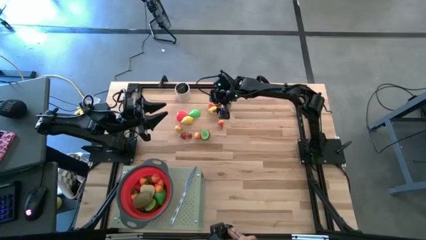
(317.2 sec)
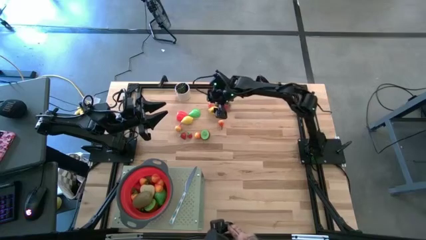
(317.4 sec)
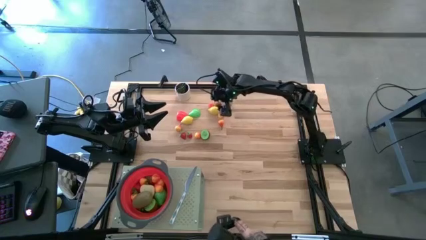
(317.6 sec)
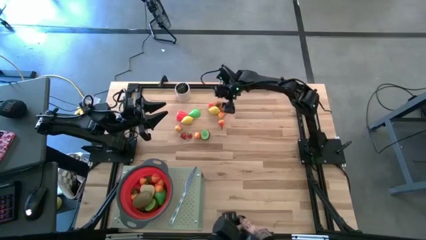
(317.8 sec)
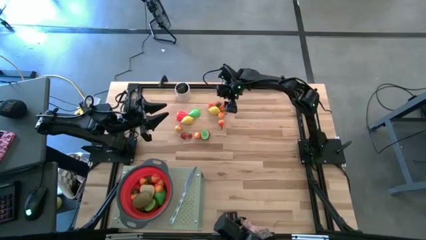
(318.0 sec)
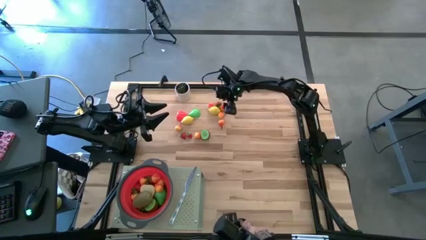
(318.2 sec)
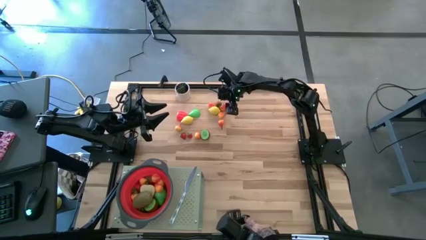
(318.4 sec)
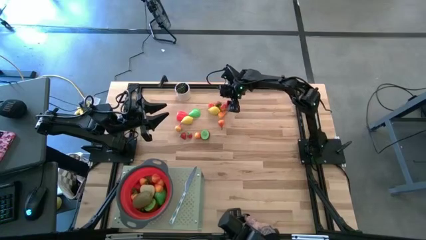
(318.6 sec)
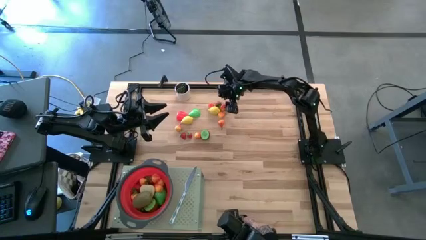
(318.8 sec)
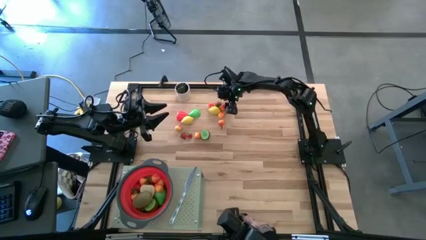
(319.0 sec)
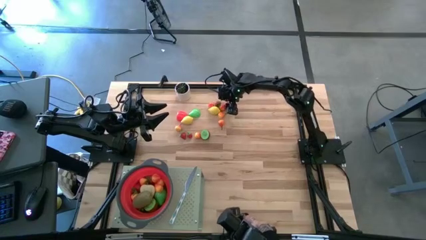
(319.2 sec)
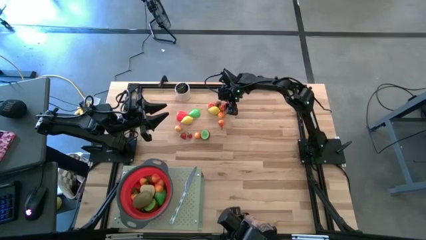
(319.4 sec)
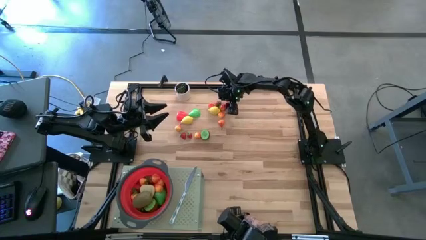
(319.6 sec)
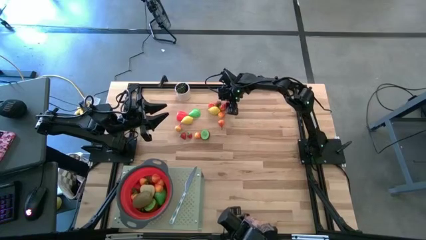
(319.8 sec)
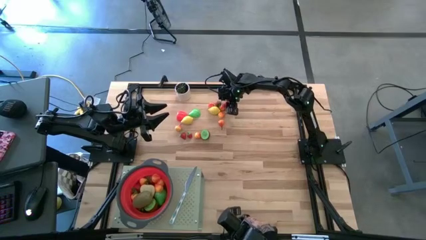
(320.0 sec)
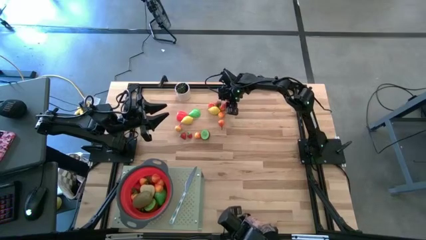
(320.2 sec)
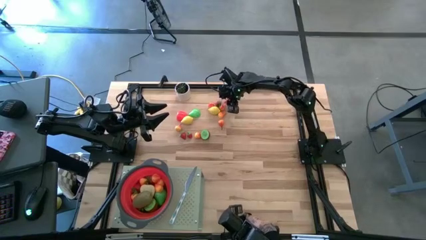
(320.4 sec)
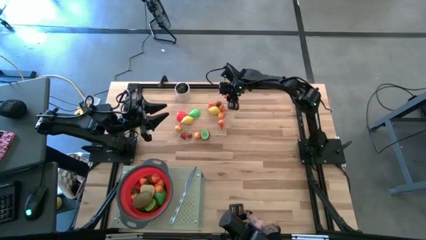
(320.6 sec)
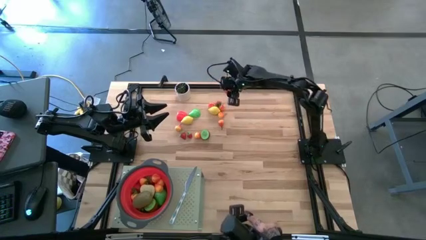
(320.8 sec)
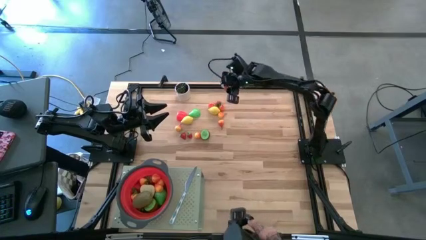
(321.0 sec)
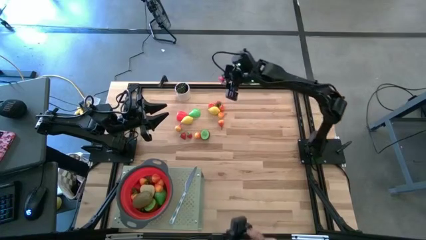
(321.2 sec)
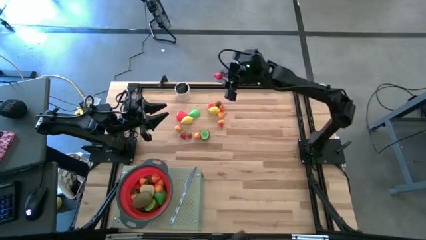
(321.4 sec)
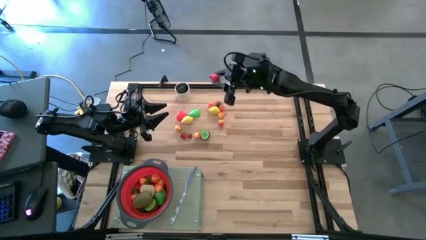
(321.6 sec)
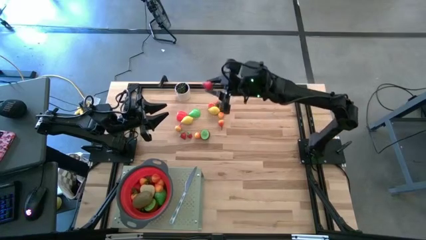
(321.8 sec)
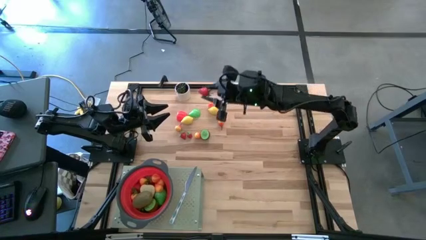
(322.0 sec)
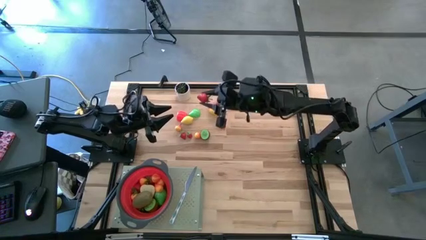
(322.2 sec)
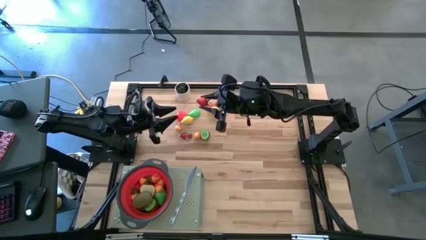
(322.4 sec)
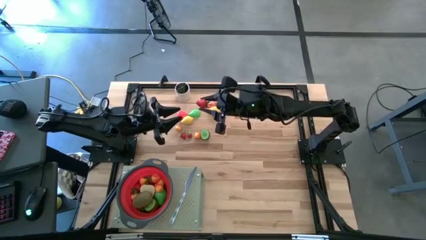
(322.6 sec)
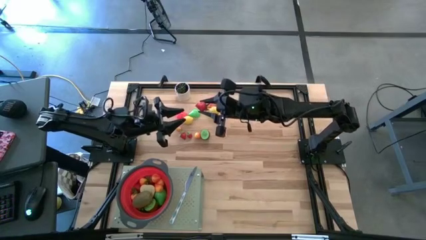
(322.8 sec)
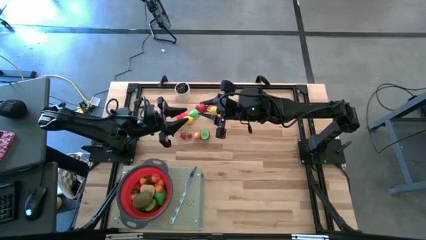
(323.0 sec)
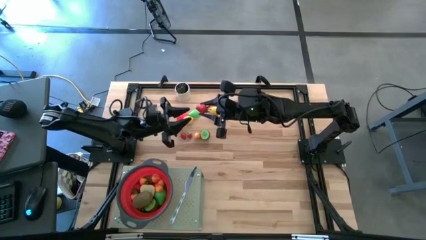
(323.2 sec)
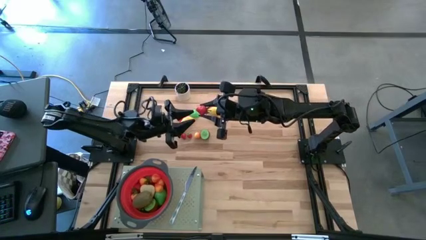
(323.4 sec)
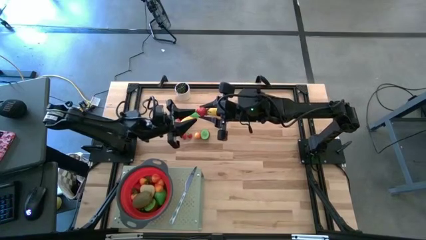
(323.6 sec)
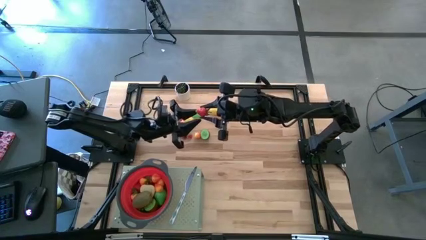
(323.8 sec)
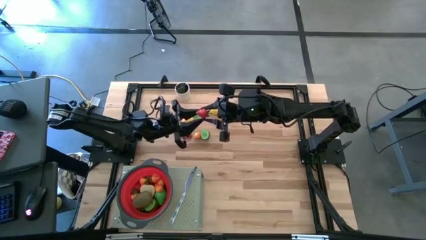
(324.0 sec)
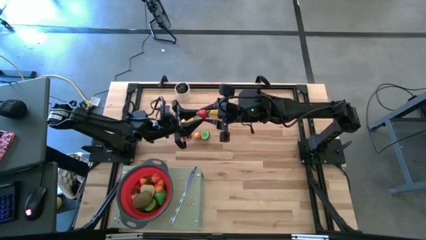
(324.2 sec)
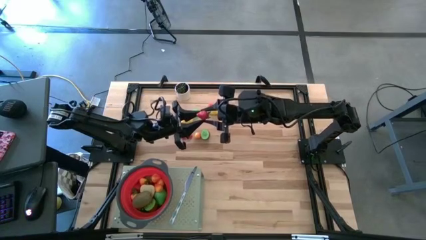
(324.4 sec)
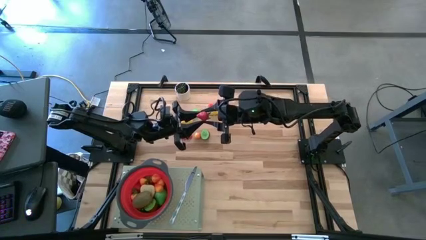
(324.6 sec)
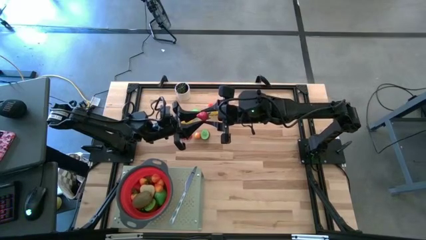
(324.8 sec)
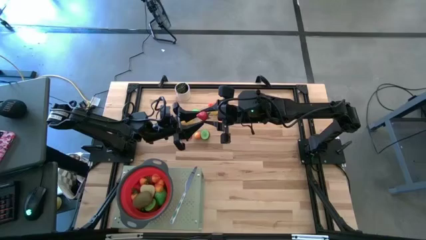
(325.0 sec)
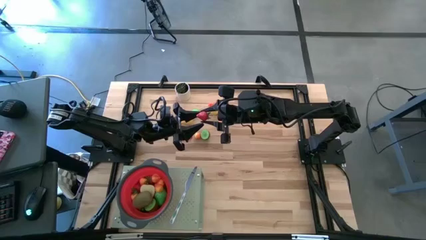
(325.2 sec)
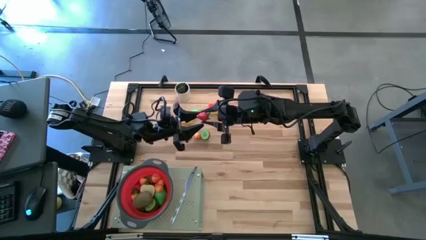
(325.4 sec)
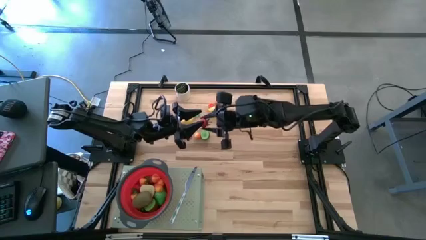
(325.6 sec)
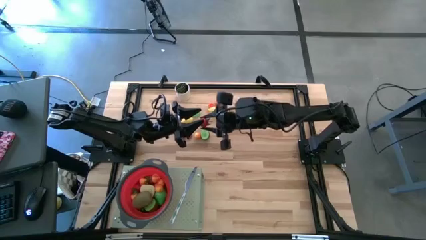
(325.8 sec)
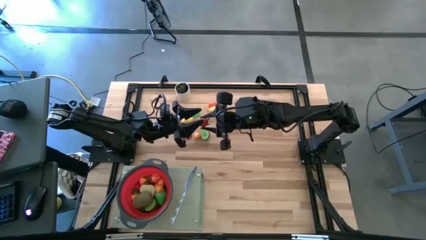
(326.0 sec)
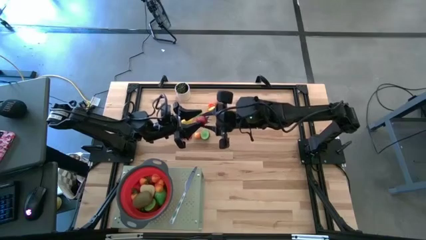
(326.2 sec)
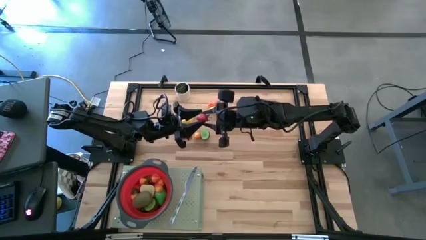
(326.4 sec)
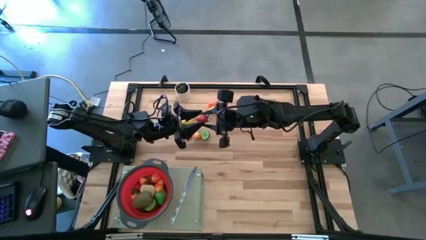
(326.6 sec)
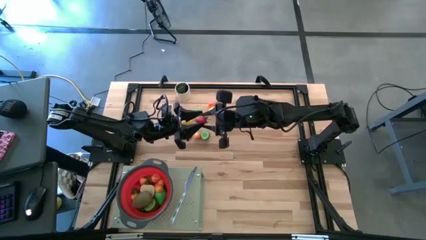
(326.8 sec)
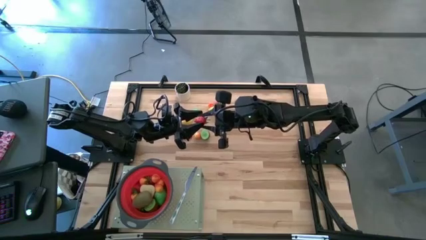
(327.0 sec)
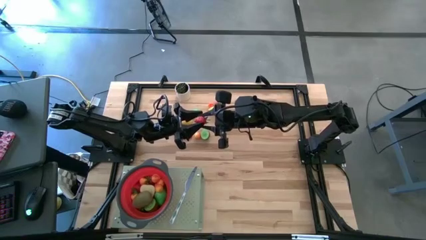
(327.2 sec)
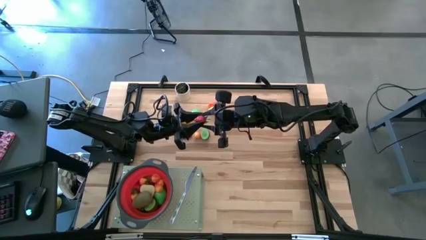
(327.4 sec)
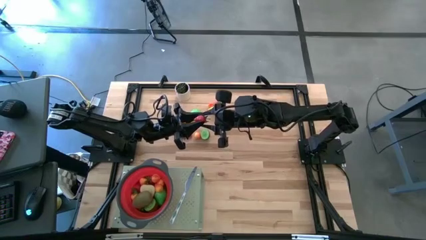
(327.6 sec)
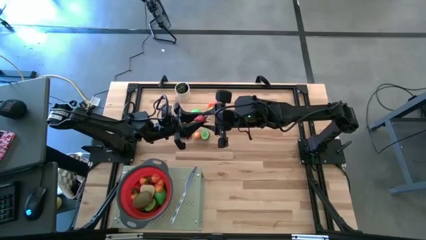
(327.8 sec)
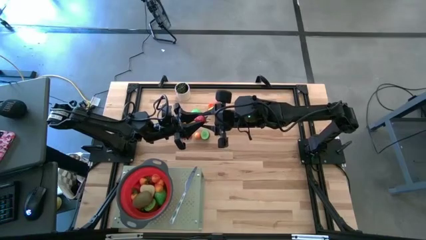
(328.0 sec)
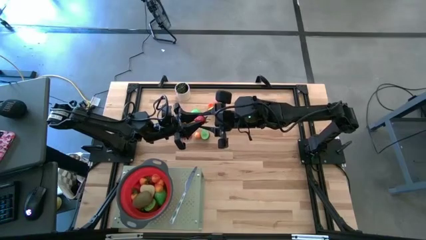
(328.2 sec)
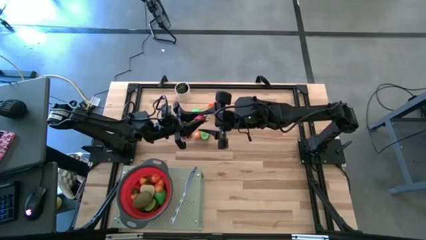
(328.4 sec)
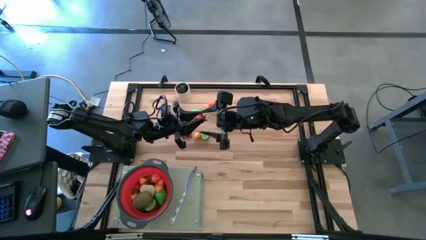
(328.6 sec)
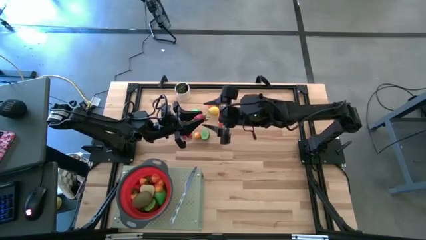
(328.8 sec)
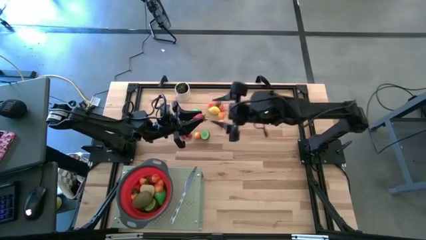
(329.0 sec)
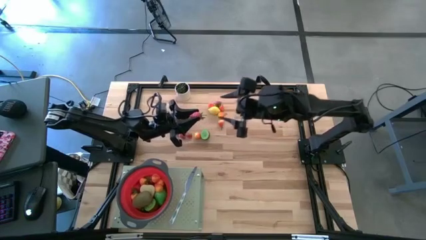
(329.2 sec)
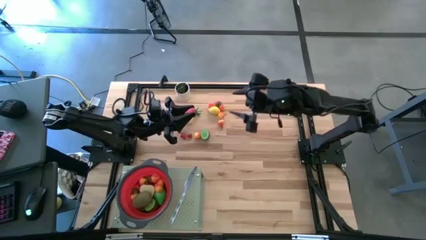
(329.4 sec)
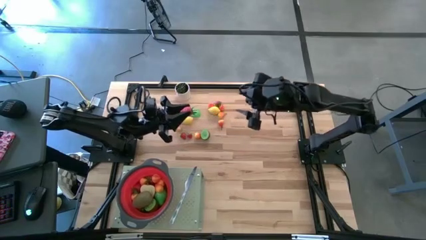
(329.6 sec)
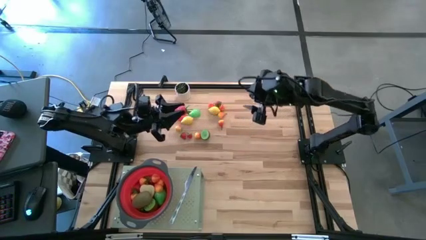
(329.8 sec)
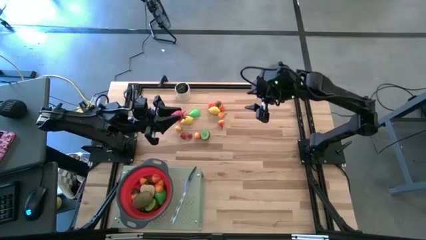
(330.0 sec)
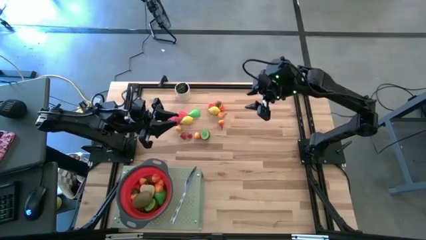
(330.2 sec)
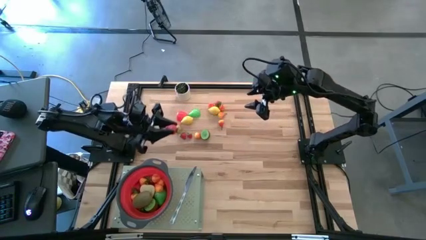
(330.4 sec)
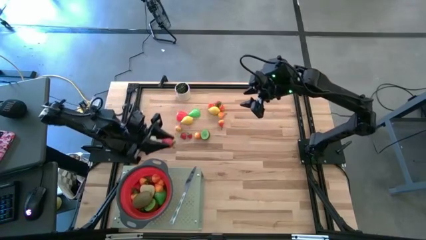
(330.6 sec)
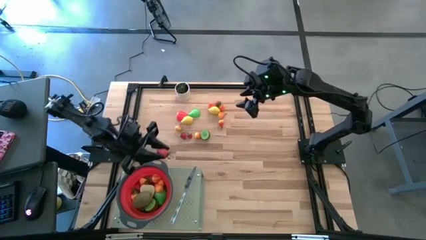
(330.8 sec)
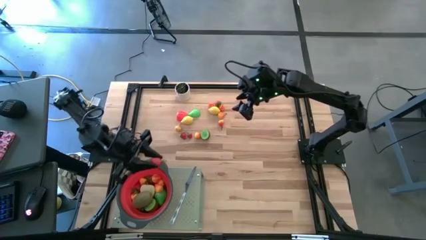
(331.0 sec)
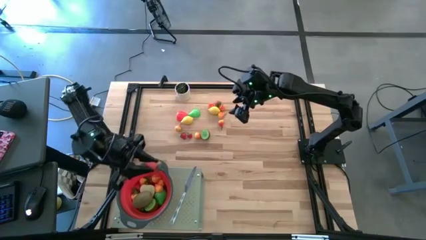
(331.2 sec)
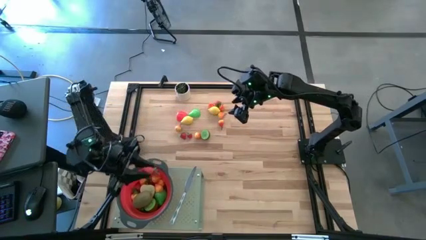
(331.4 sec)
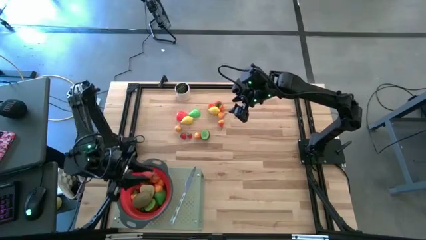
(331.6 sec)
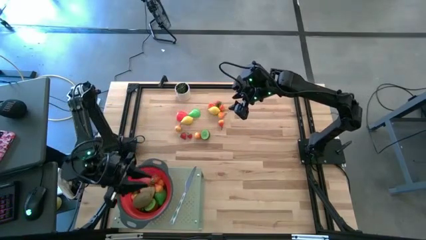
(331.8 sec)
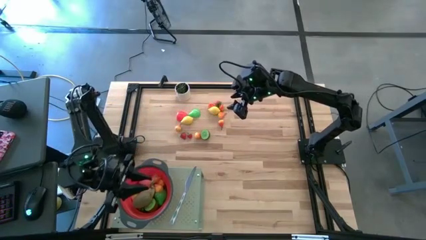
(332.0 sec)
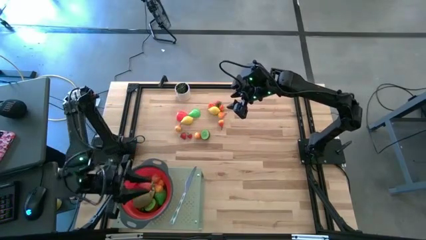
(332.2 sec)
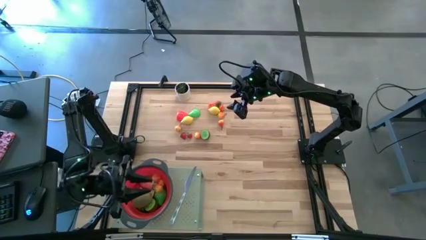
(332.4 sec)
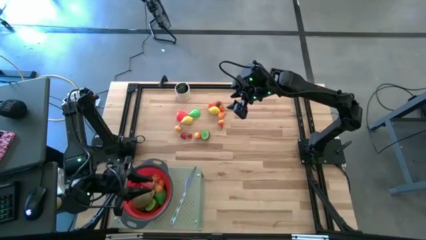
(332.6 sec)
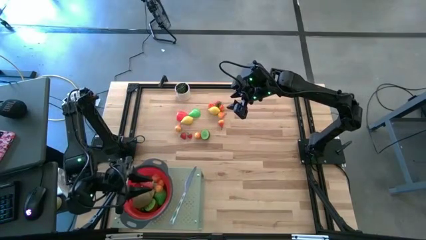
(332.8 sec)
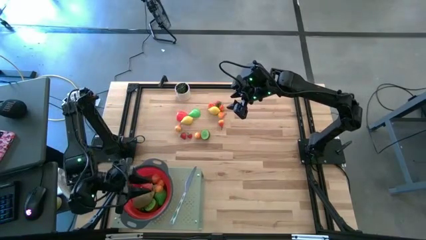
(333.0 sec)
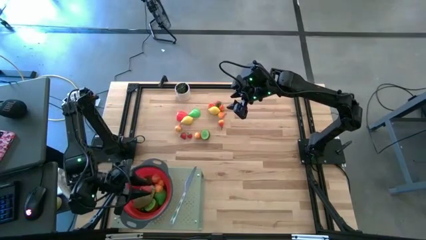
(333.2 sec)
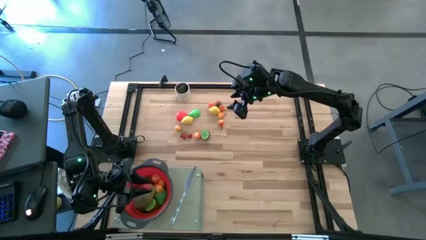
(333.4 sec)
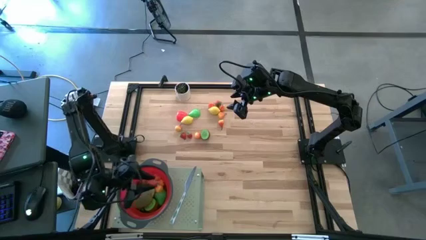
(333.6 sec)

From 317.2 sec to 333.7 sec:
Task: Pick & Place Fruit
Put the strawberry into the red strainer bowl on the shelf
